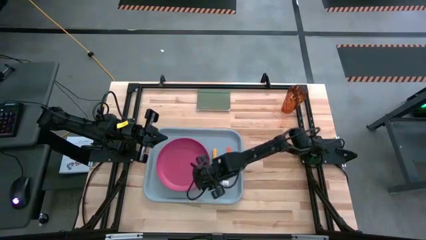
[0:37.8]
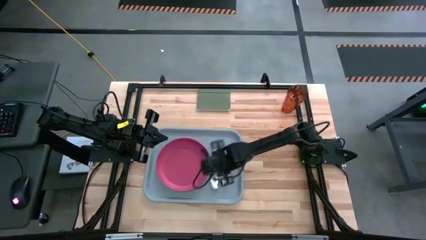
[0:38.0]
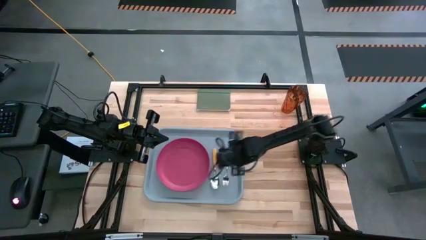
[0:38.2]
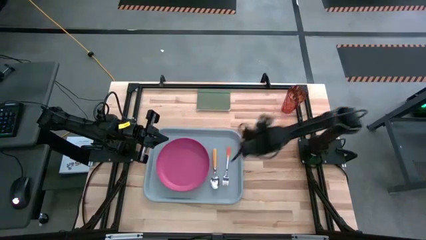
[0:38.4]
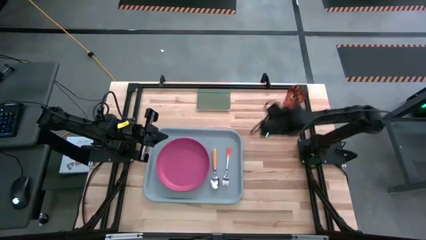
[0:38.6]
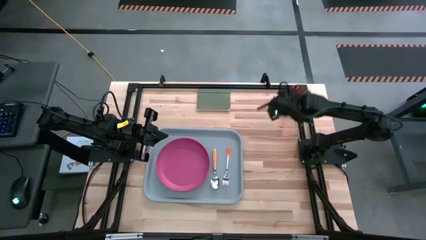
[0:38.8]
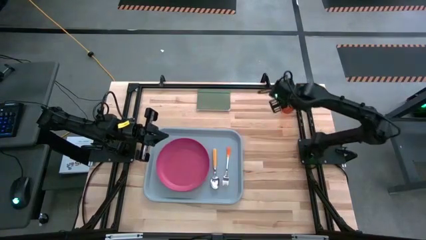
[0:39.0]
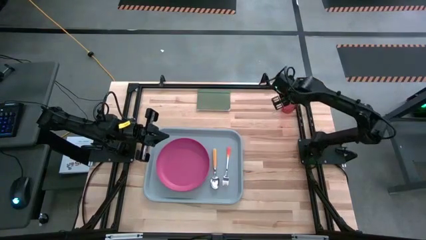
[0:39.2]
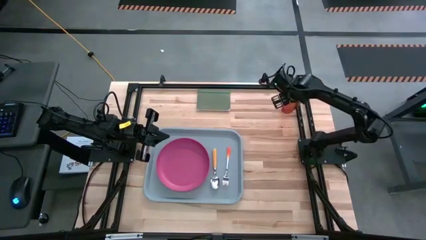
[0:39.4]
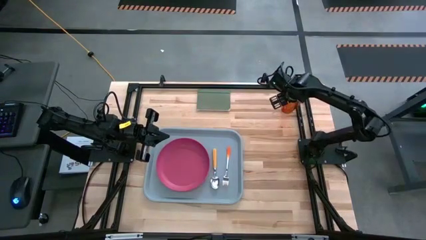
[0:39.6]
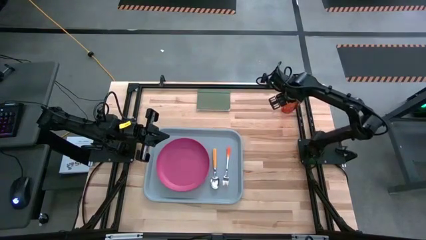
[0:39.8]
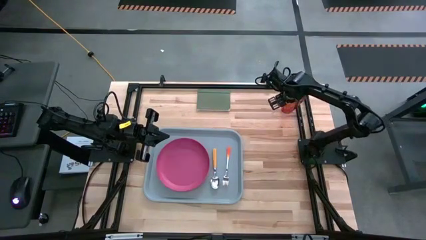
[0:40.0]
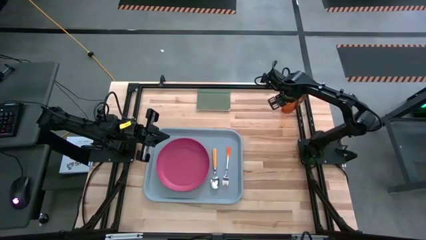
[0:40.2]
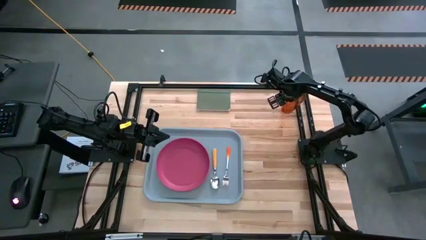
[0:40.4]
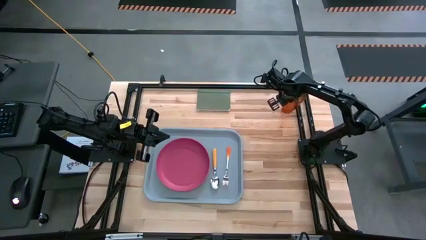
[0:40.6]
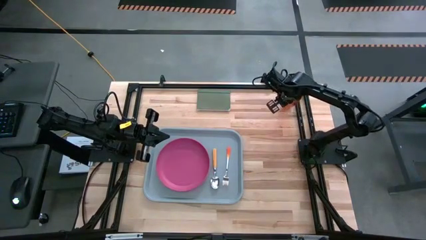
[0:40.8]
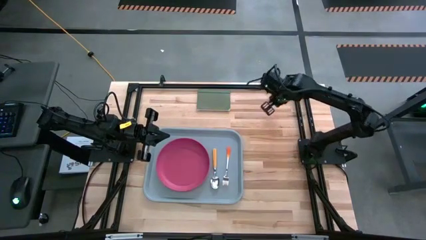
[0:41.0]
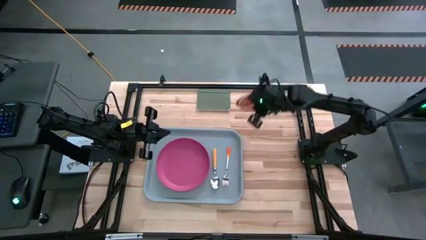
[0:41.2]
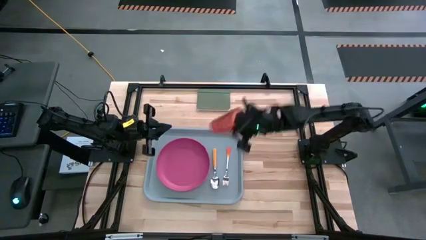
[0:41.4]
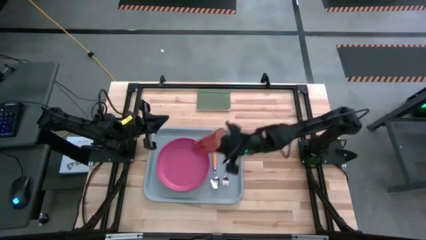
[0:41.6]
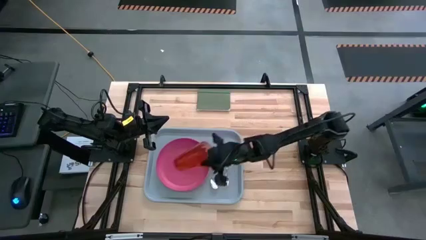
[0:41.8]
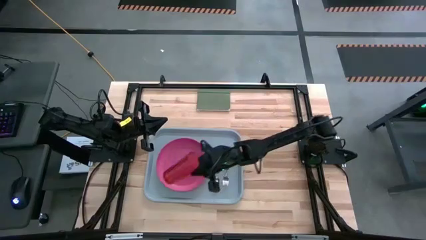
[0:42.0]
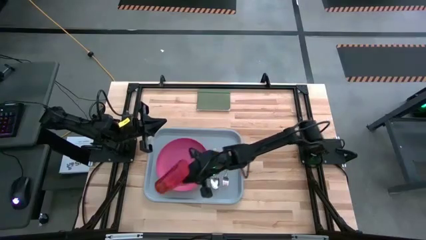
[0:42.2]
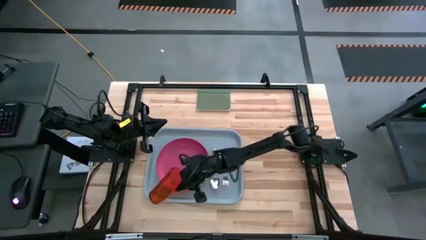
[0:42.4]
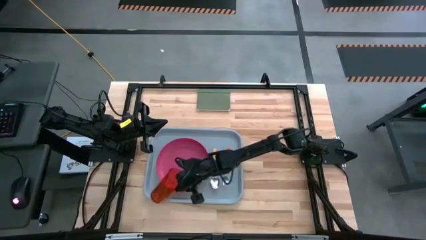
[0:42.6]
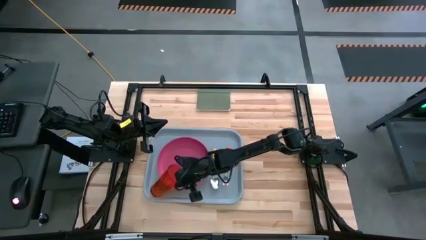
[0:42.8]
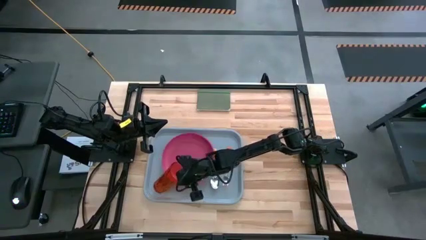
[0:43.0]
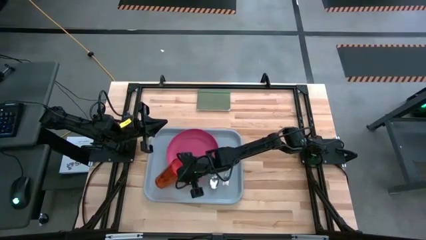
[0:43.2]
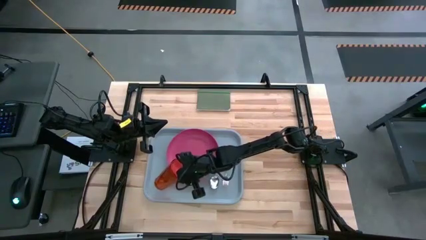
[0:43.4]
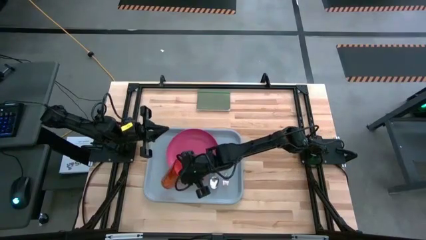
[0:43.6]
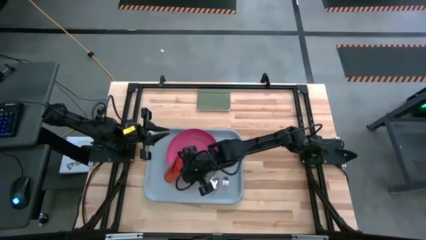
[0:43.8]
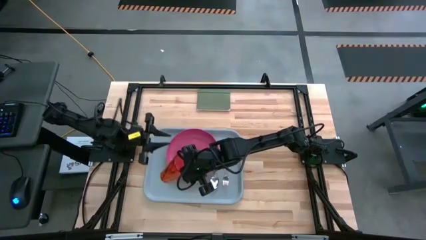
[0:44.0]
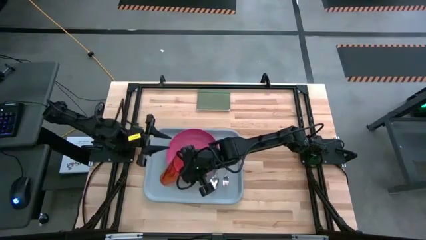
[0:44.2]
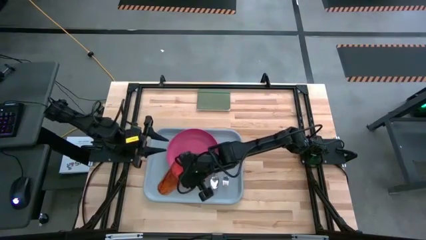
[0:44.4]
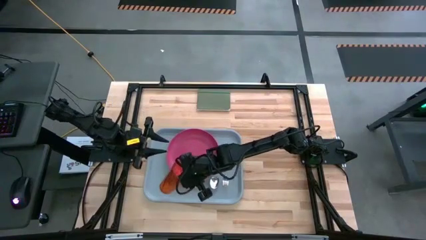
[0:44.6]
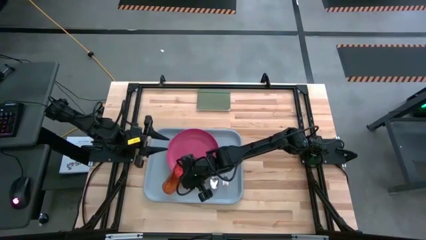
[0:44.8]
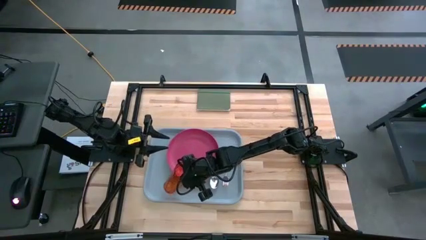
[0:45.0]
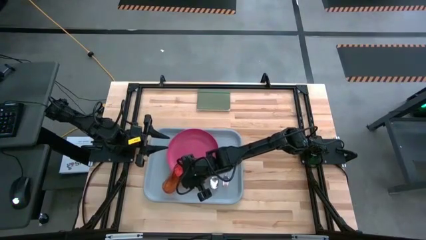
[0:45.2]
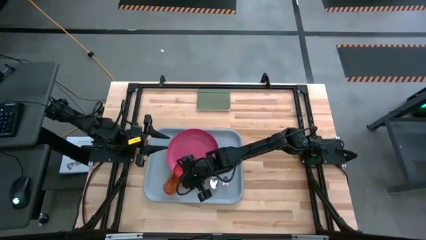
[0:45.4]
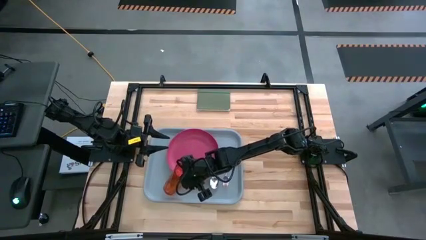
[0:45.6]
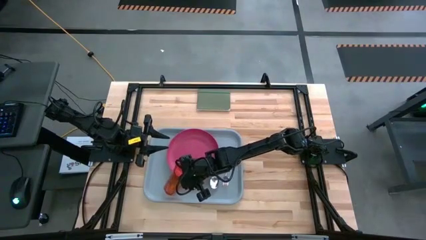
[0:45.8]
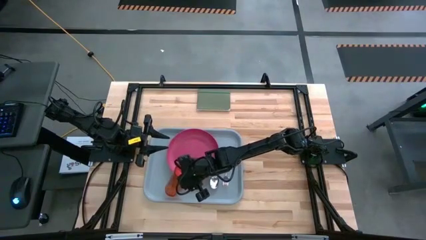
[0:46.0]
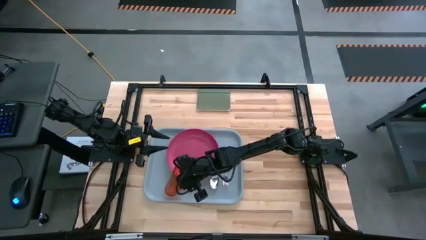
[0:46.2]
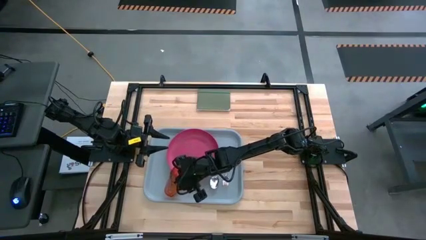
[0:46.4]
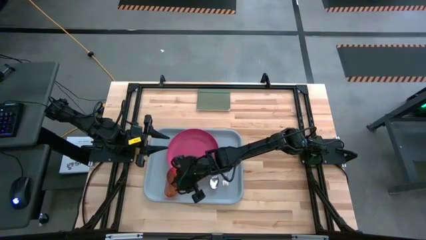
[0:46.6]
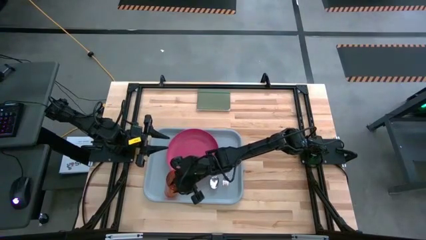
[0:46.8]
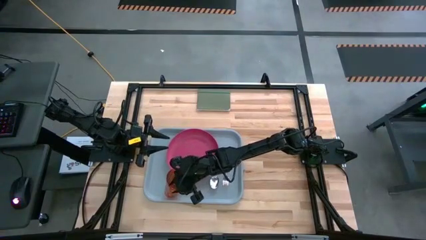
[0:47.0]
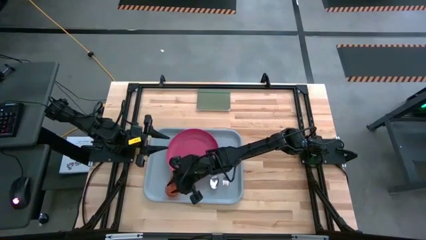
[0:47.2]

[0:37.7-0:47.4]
Task: Pick and place plate/cup/fork/spoon on tray
Put the orange cup on the gray tray to the top right of the pink plate
